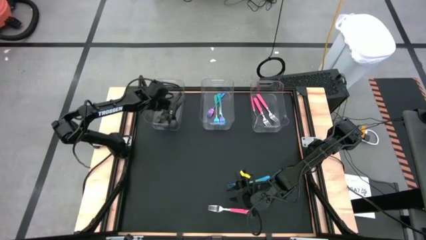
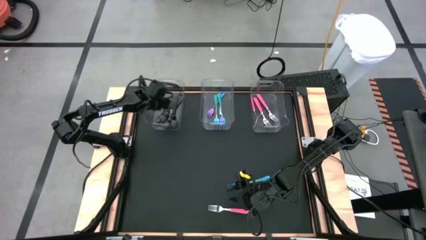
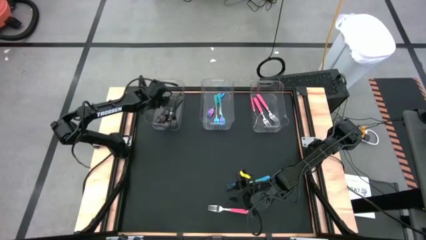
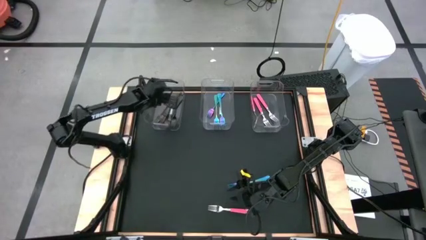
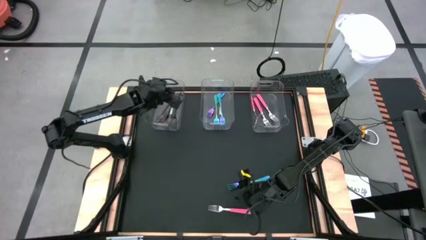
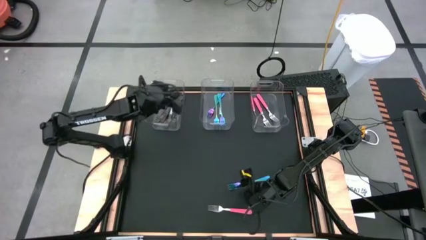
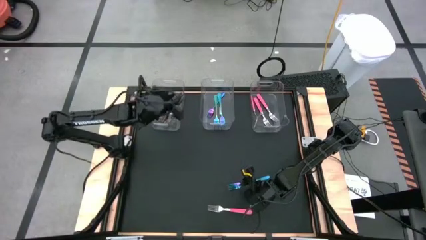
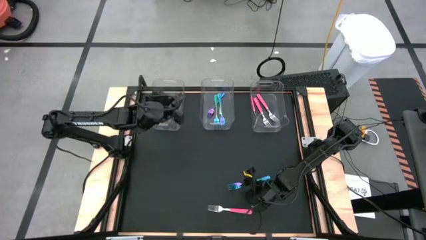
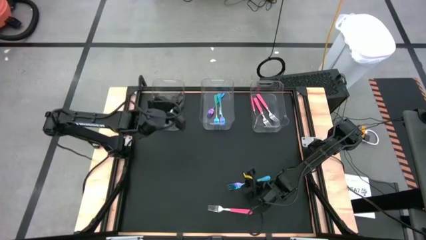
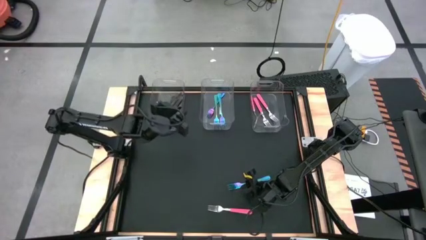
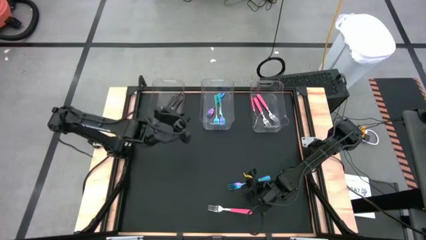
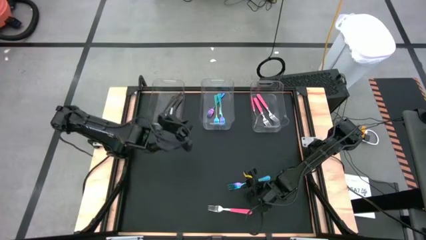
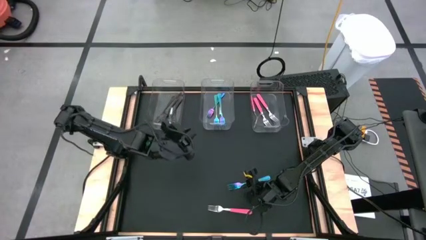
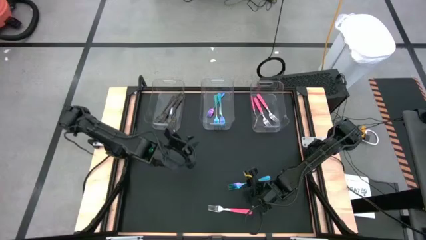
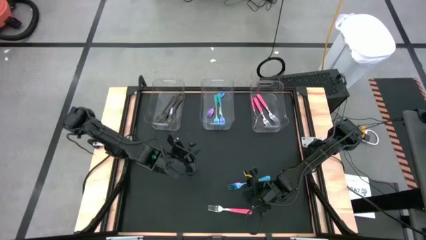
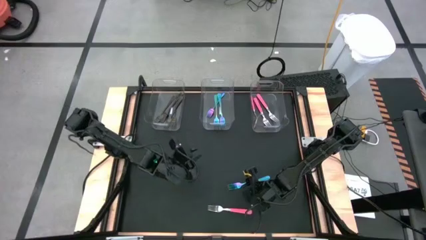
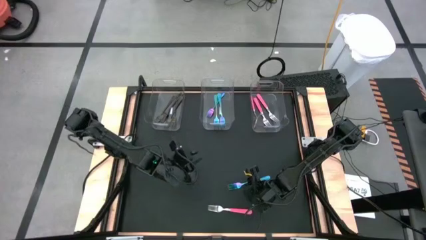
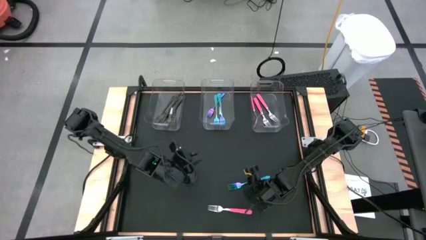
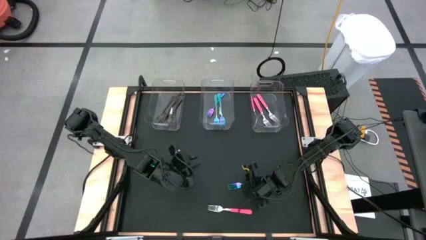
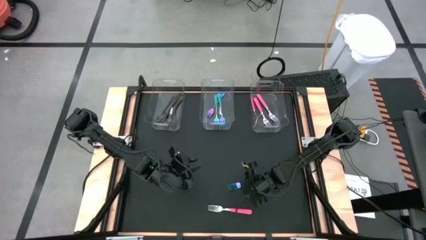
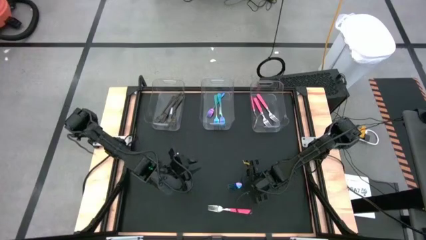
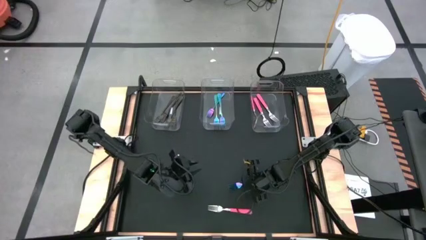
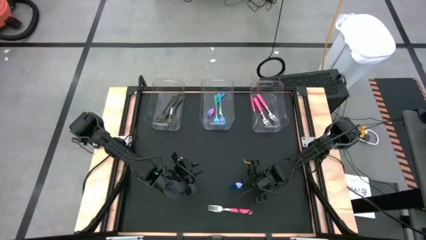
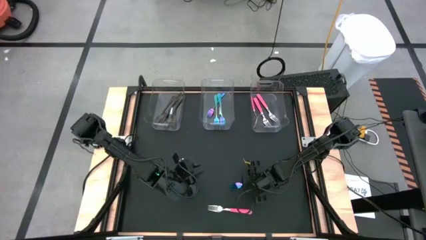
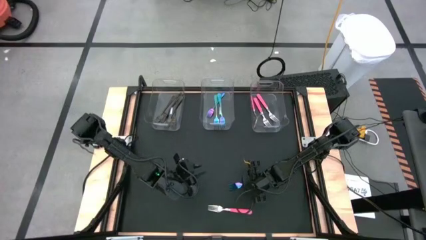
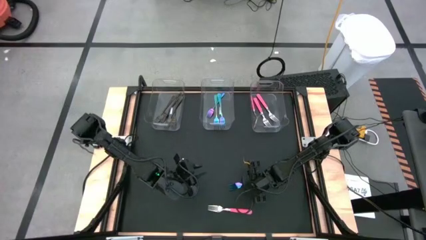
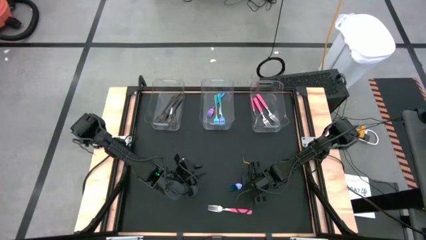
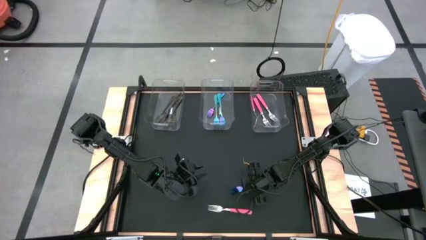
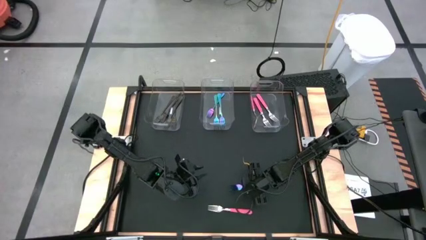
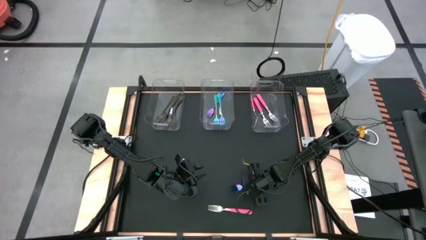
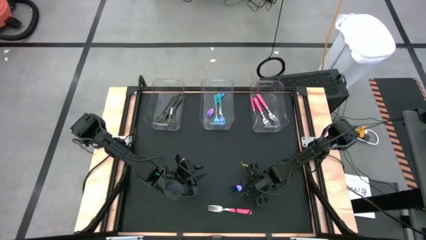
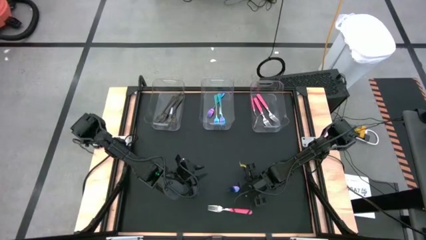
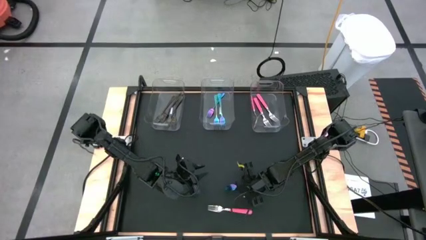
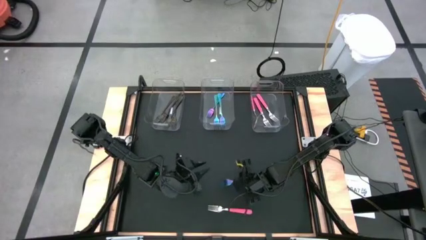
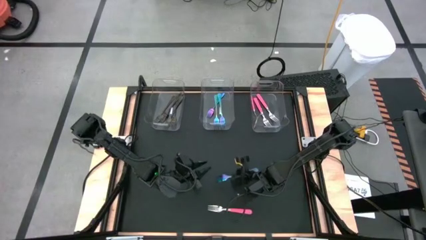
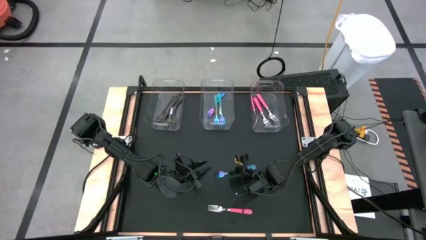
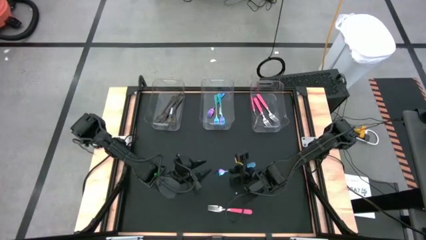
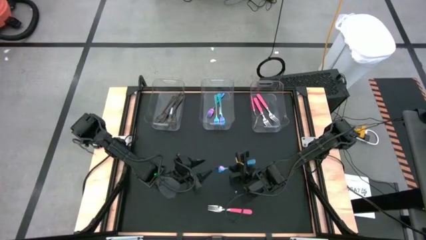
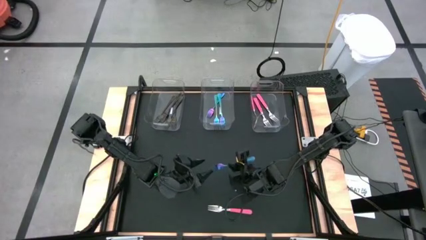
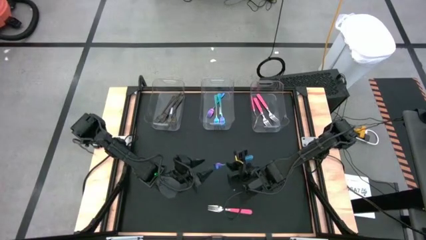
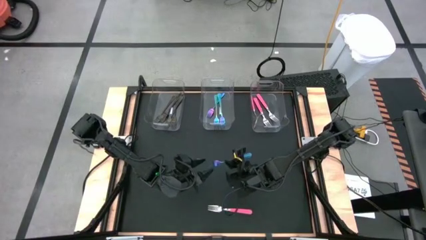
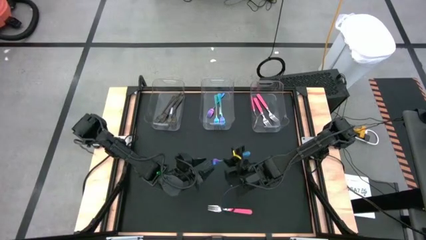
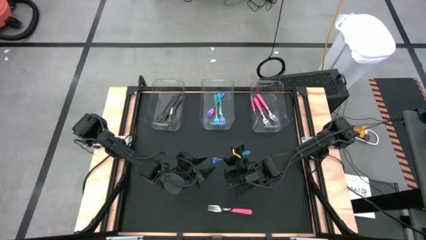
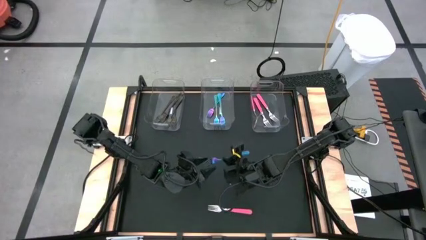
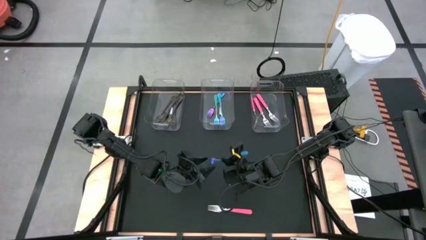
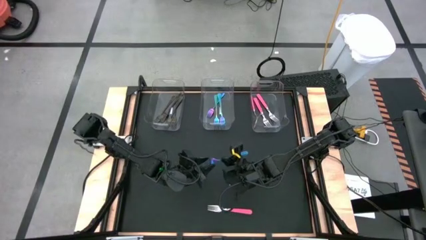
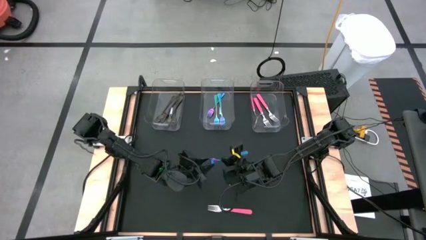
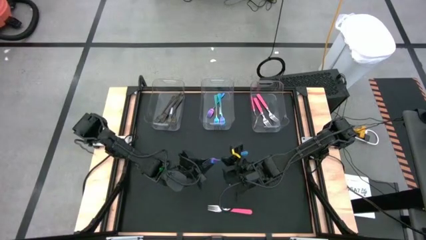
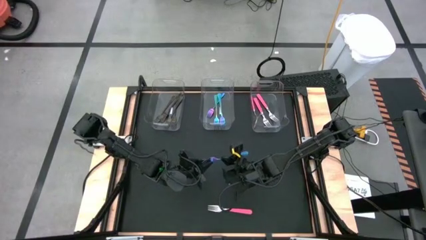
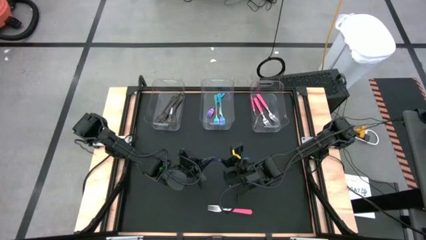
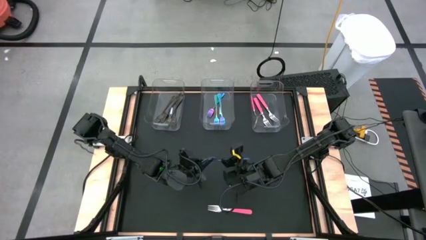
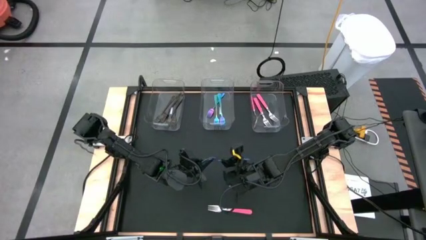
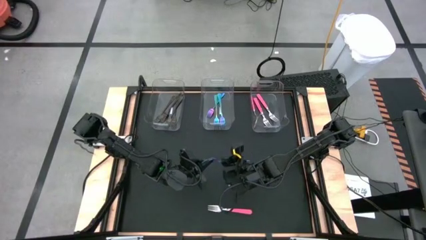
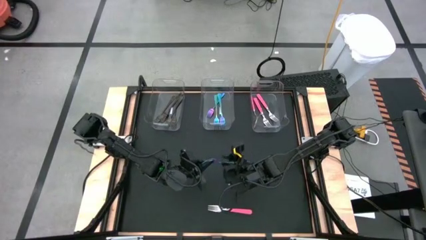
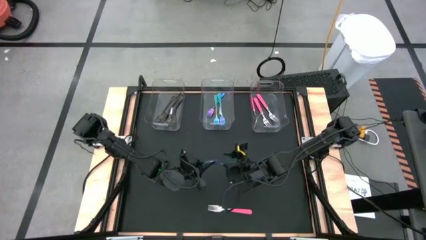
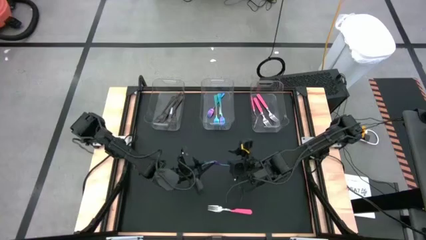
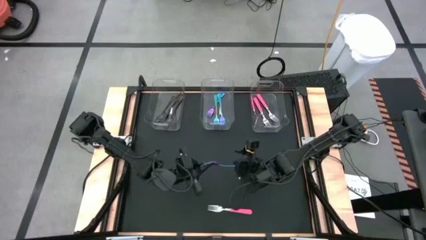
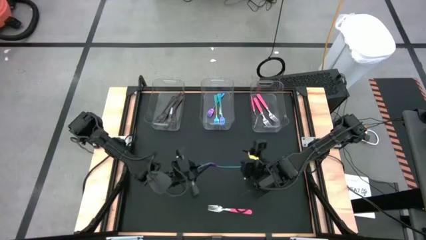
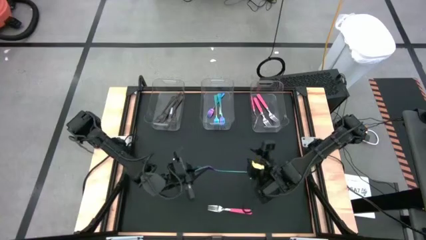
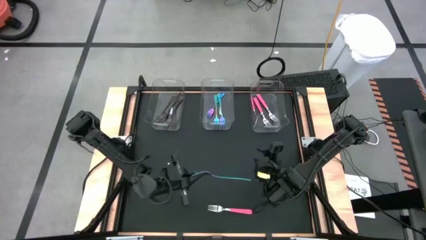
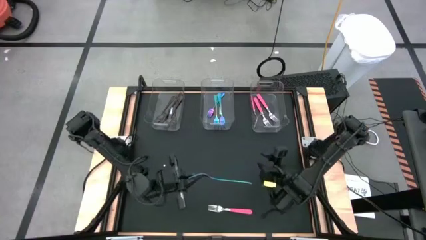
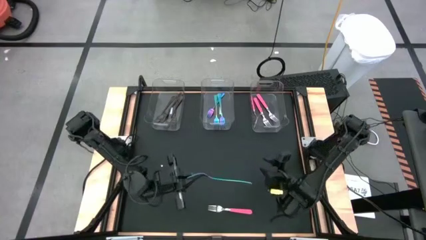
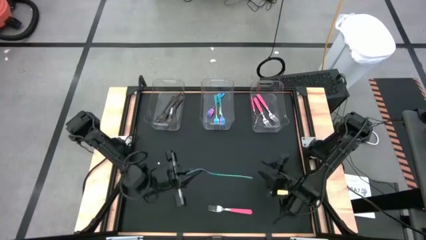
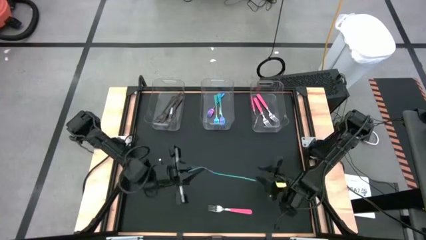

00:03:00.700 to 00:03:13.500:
Task: Sort silverware by color (type)
Put the blue fork into the middle transparent bin

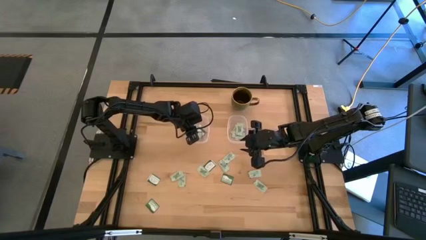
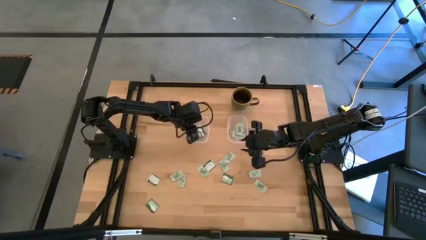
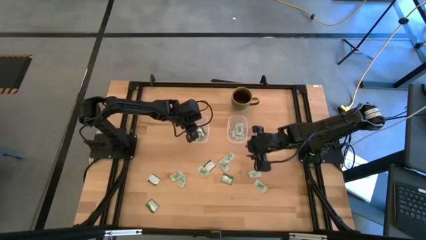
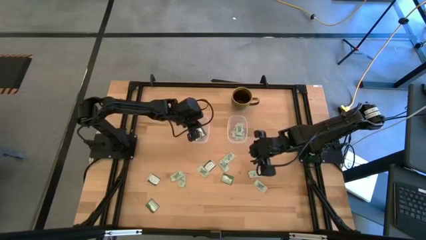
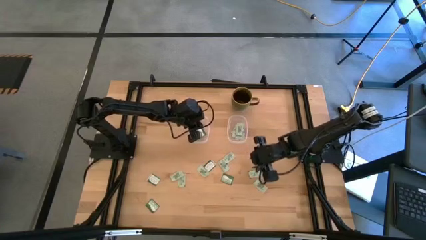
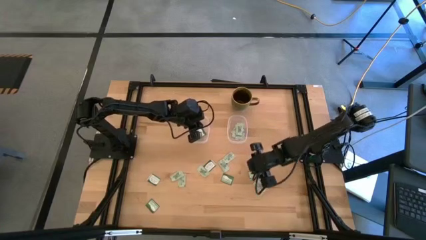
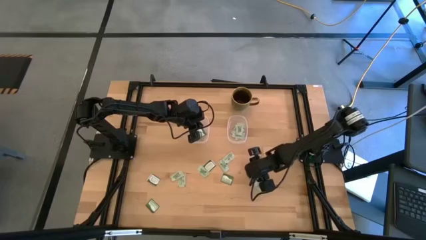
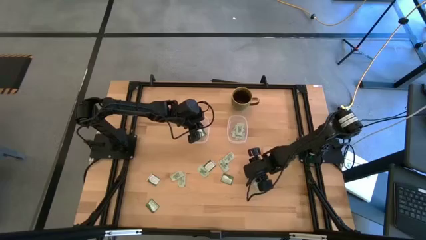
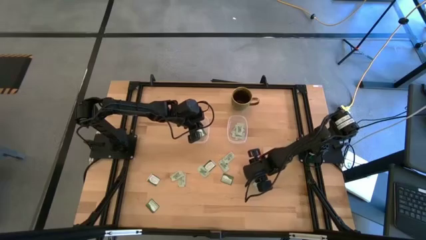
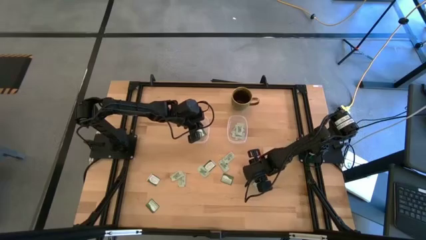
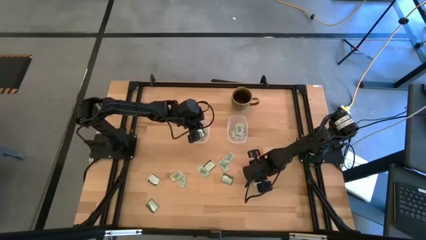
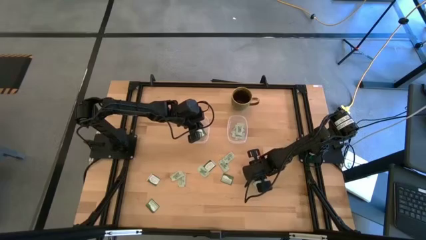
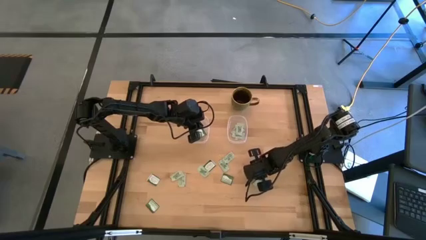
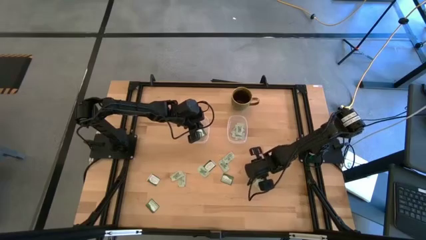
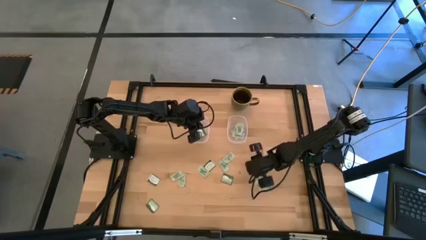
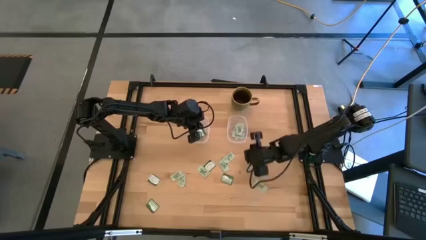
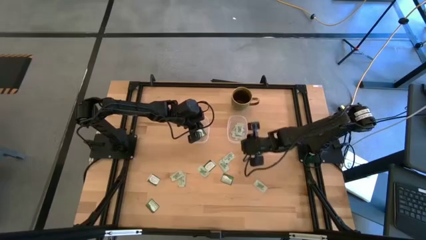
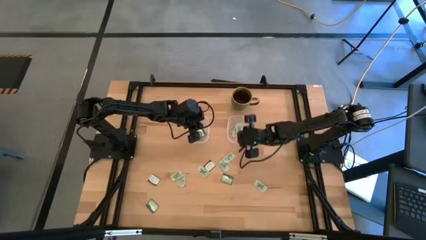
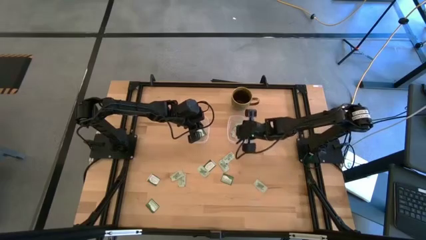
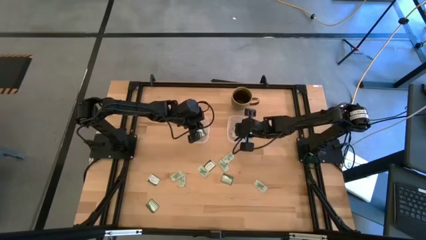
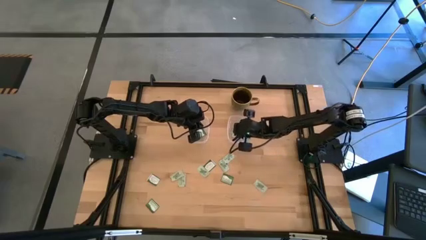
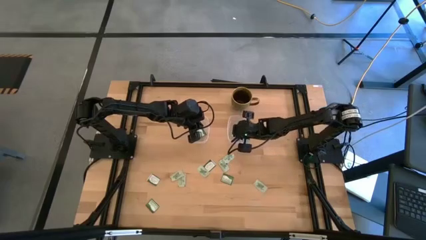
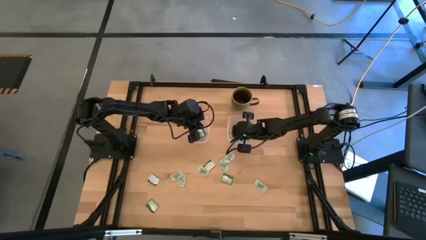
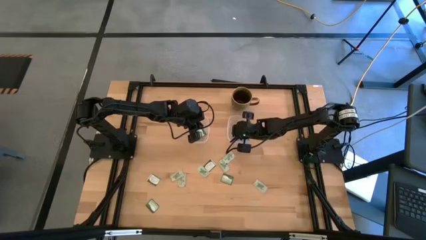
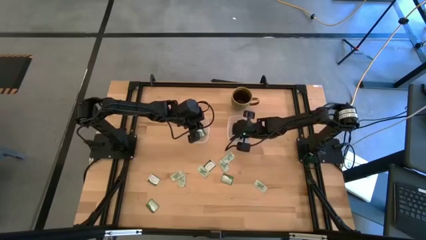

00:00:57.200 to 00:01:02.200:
Task: Pick and place items into bin
Put the stevia packet into the right transparent bin
